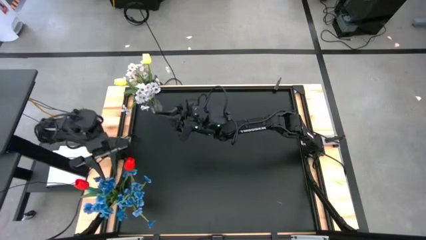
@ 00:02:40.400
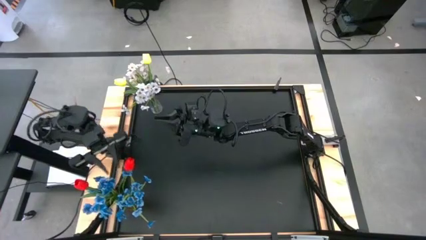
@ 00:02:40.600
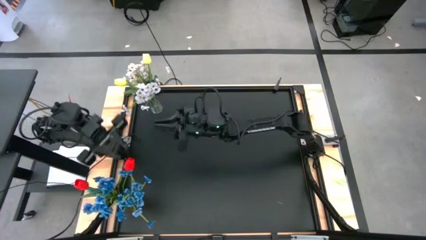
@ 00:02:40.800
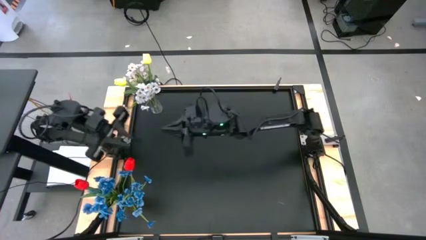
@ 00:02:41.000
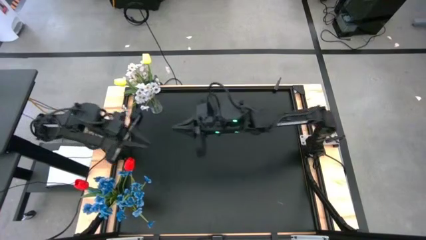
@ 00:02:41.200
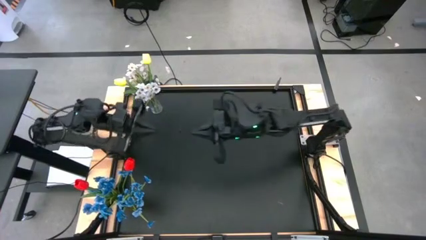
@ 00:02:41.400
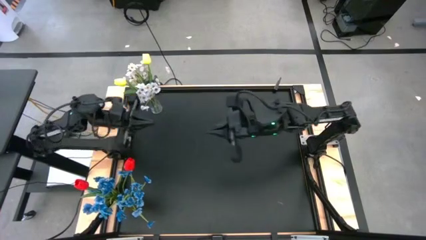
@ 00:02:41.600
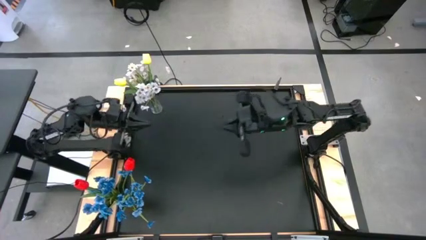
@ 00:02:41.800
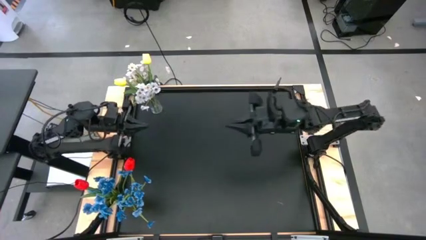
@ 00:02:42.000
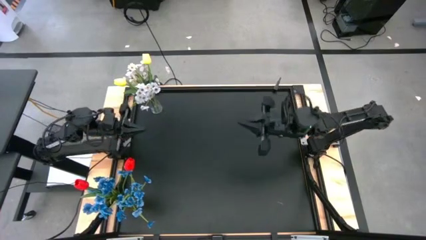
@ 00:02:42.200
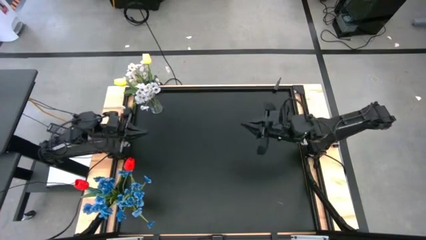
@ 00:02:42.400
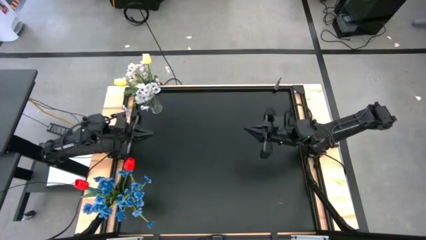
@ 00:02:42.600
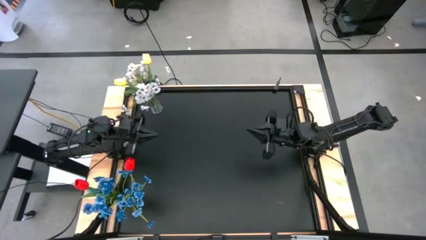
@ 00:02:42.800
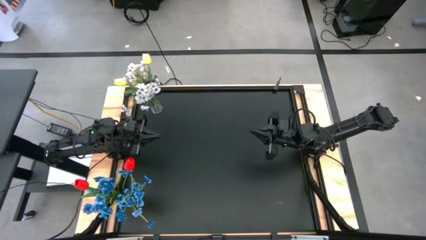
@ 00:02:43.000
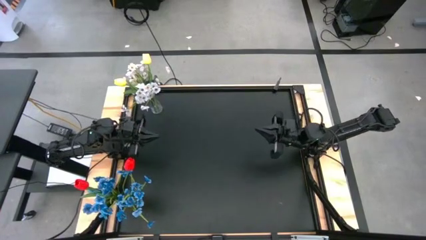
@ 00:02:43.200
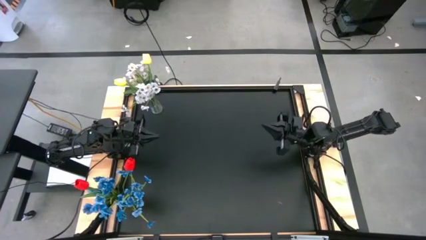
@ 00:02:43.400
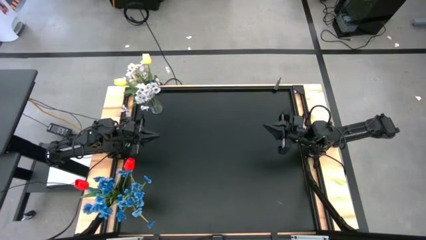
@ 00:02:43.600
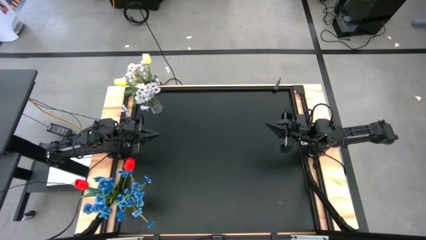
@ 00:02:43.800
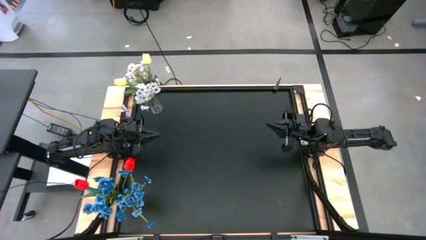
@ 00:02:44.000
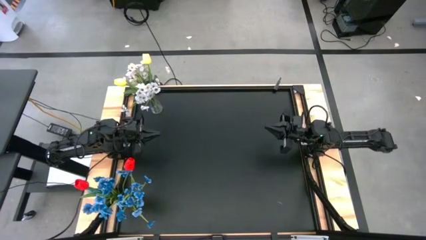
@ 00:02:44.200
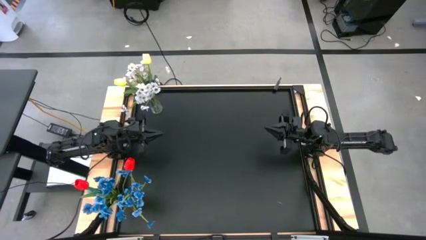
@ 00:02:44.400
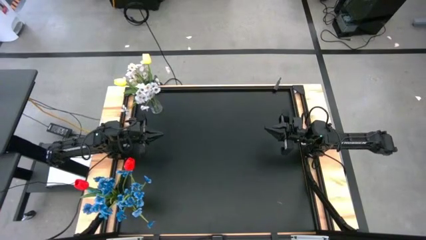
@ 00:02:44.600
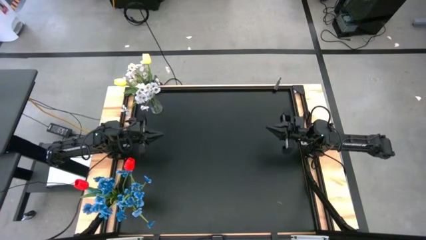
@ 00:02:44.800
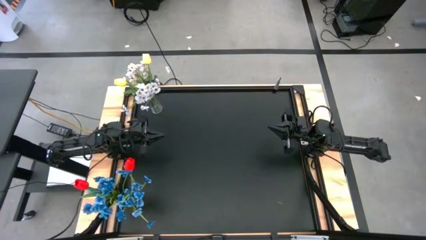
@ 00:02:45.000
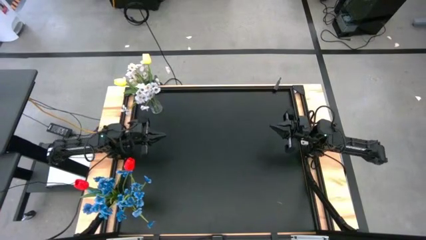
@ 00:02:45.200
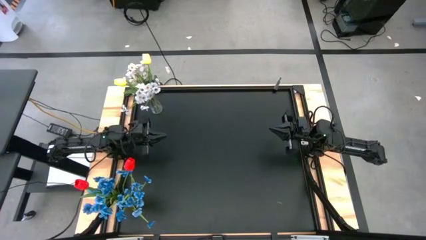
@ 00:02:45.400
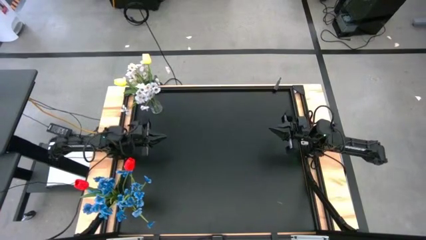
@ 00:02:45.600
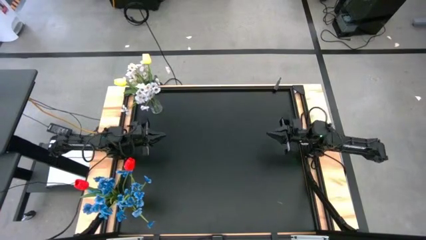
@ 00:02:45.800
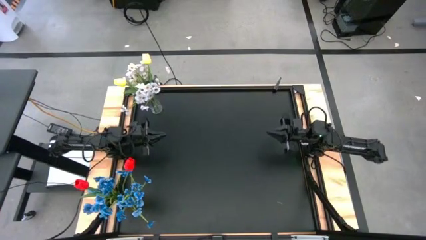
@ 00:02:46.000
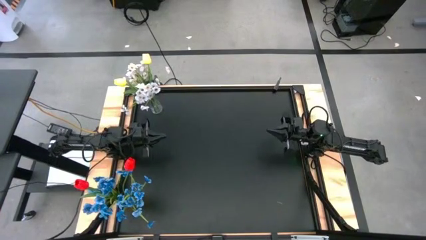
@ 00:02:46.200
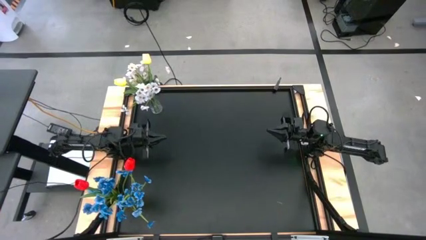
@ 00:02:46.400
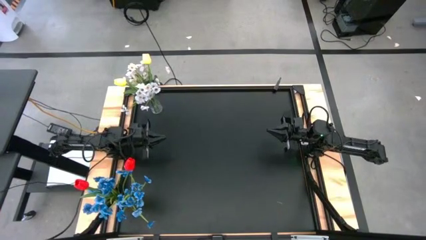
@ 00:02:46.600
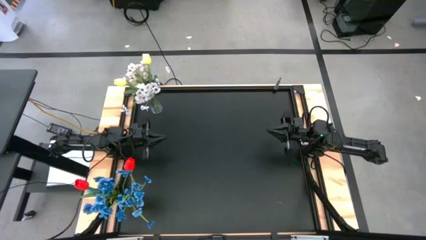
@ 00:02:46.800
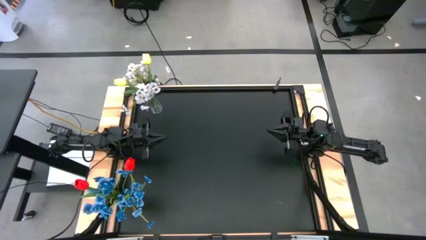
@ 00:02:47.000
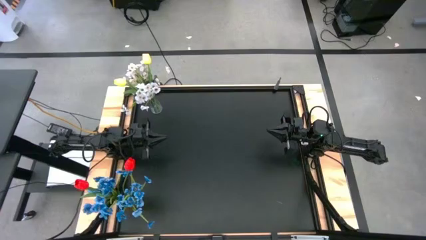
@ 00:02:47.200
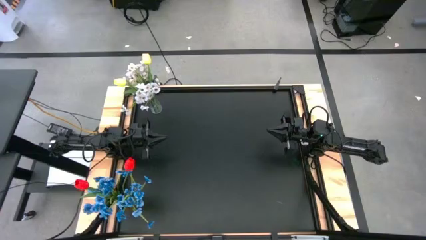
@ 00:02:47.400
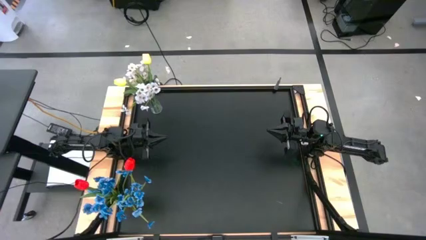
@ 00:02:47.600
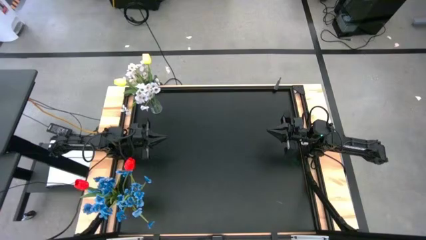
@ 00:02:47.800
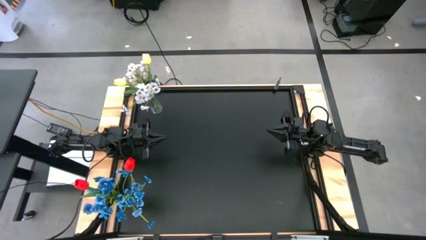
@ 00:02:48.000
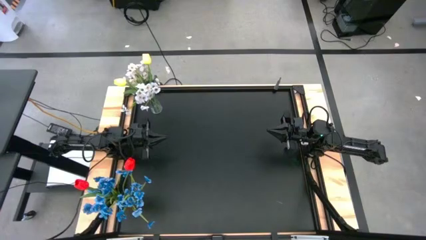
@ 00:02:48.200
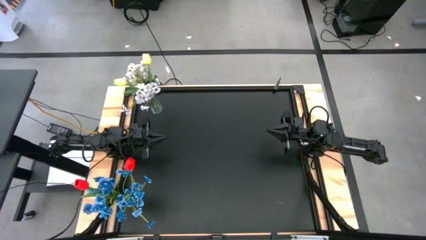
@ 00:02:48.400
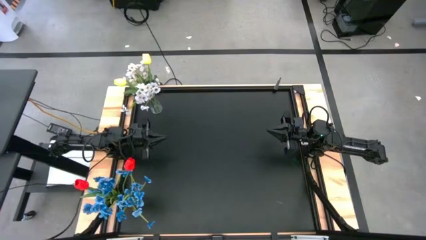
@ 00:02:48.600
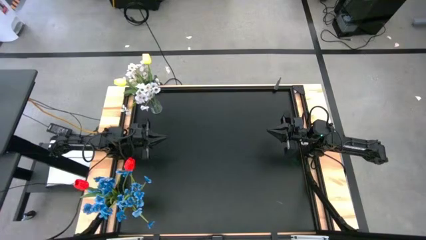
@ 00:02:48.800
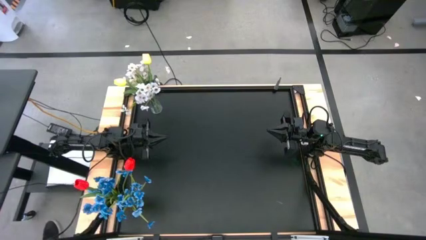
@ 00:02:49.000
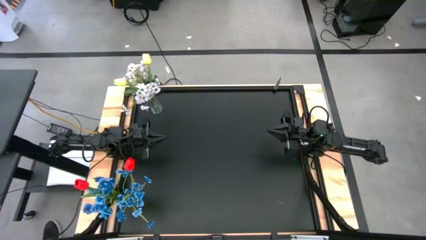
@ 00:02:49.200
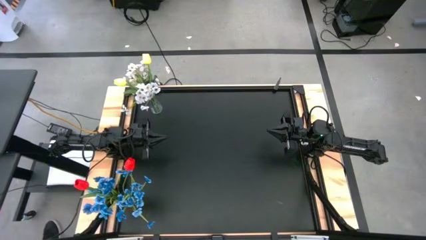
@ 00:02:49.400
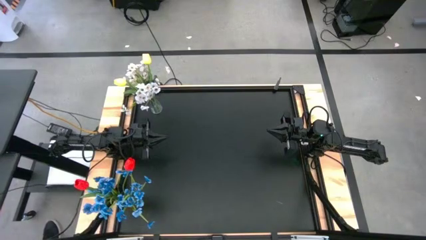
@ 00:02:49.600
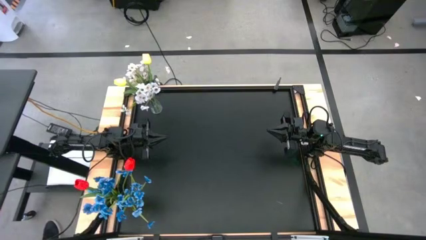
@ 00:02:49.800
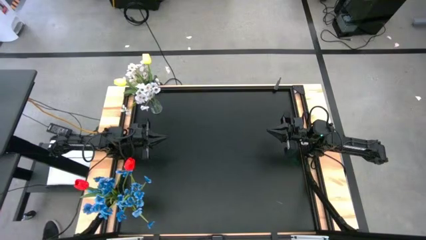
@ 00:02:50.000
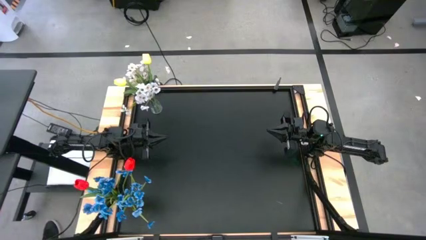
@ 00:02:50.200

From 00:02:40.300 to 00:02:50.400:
Task: Sort flowers into vase by color
Return to Home Position

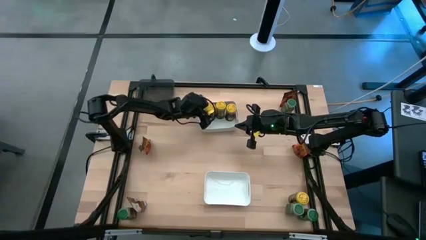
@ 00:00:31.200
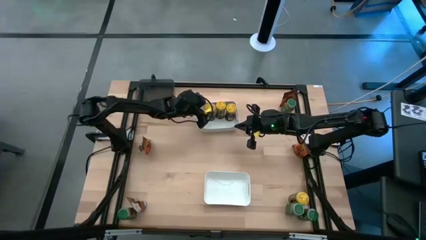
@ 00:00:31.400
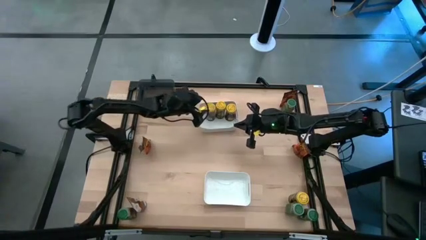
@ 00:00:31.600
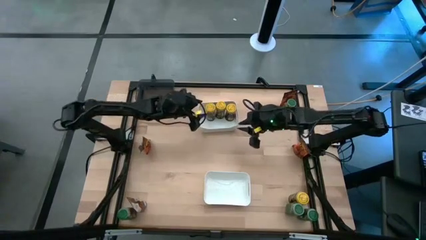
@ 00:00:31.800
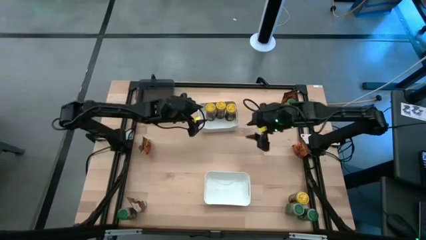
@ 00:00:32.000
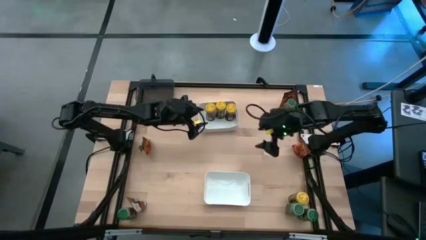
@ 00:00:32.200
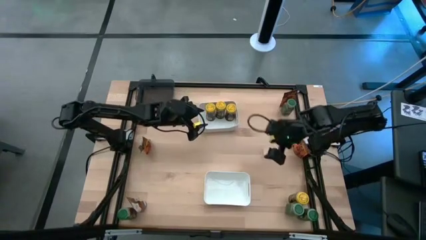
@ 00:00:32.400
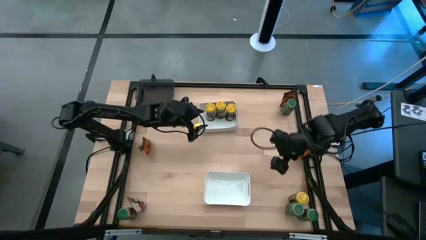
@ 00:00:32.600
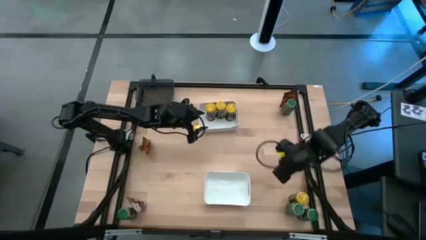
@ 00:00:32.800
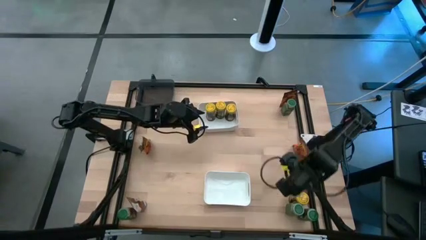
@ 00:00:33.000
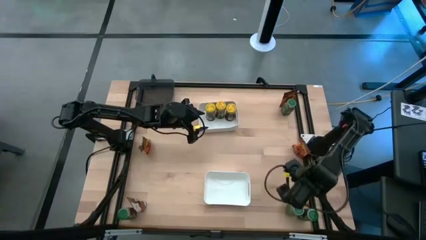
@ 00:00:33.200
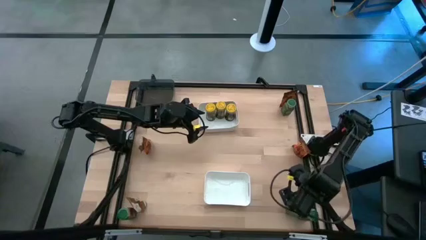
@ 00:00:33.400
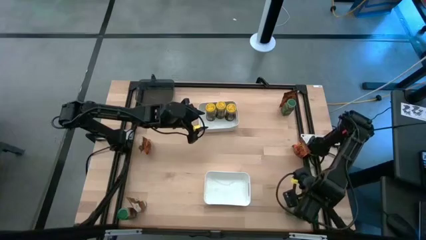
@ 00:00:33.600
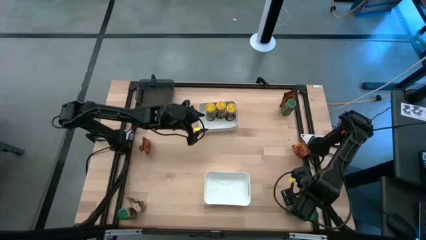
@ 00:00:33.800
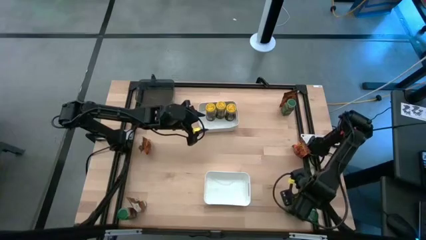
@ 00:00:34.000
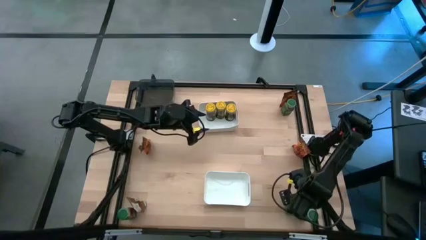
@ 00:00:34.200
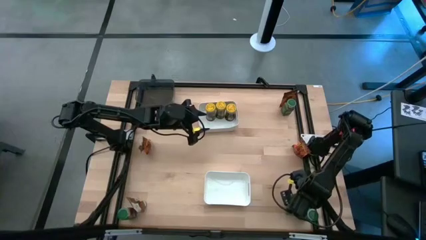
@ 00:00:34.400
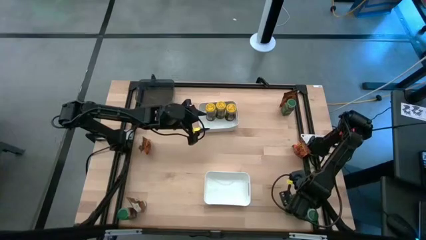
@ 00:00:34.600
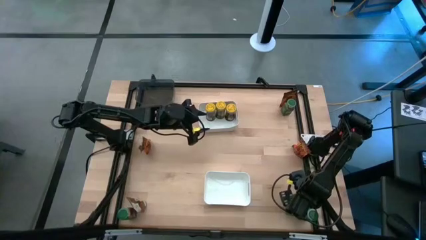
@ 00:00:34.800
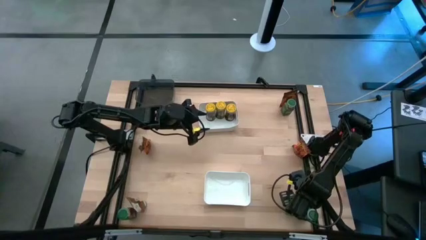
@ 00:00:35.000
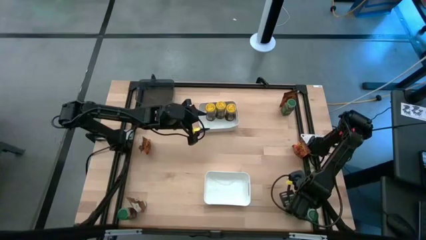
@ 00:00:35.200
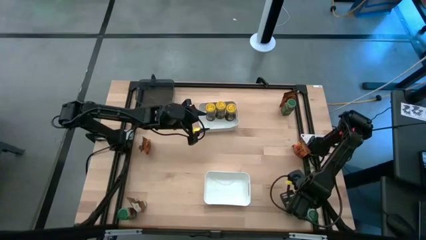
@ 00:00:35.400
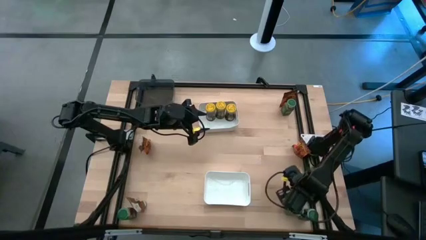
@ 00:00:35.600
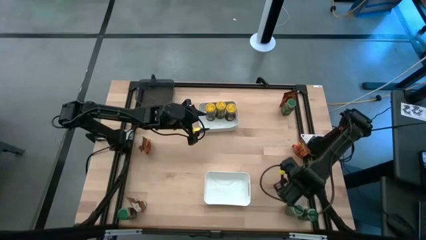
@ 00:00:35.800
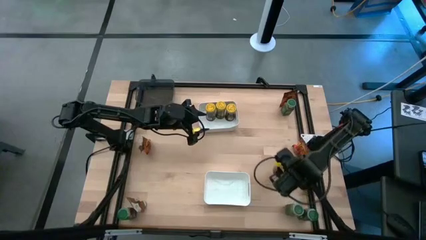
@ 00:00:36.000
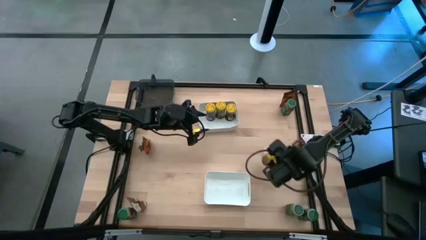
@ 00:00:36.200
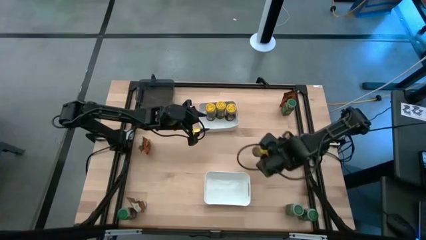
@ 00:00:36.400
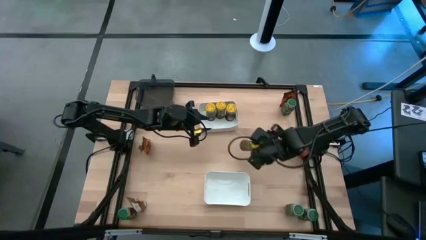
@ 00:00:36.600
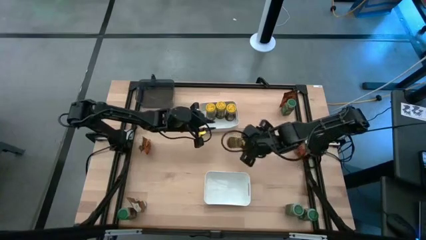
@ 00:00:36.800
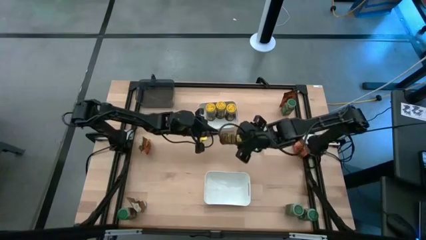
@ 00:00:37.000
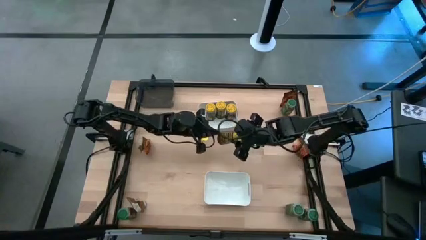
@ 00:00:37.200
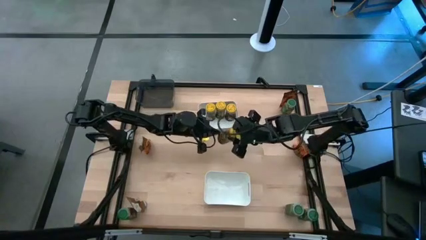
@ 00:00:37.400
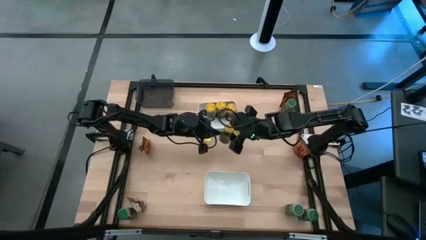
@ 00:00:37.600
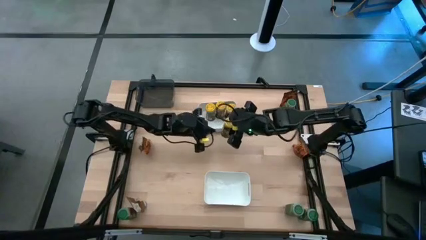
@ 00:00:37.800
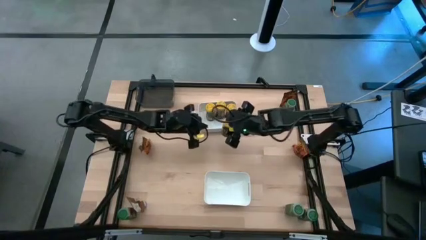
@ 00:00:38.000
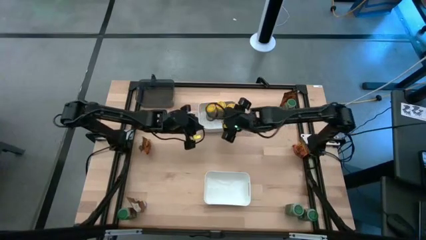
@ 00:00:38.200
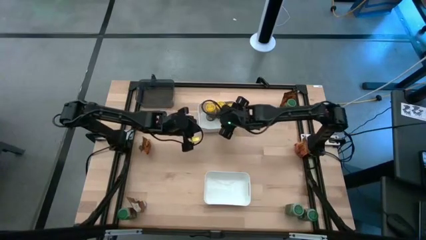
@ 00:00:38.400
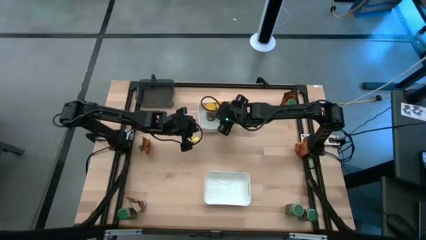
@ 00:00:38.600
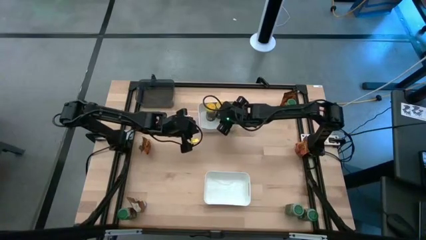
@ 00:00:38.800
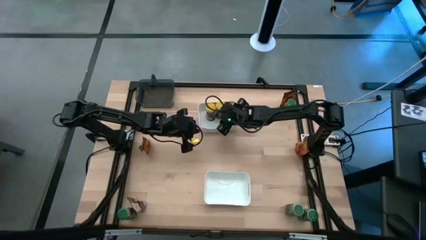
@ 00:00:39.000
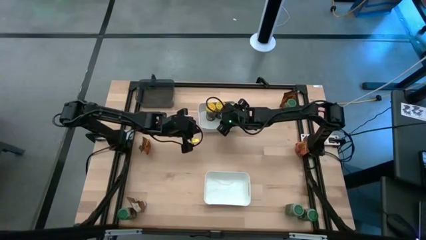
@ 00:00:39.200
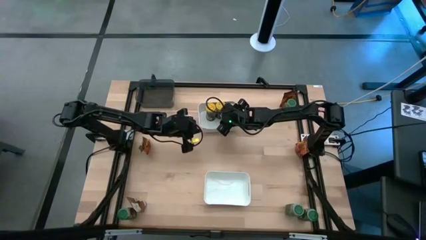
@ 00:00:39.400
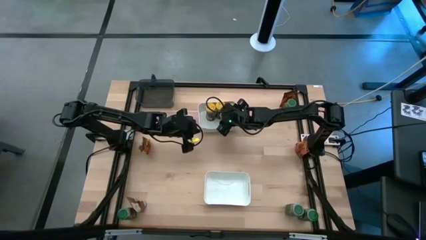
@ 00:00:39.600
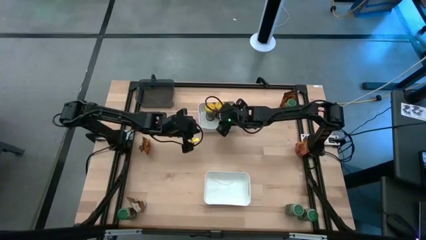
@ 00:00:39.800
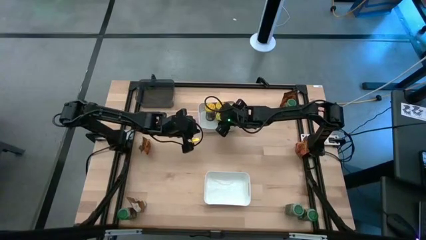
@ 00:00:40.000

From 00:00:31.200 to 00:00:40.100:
Task: Sort spices by type
Put the seasoning bottle into the top white bin
